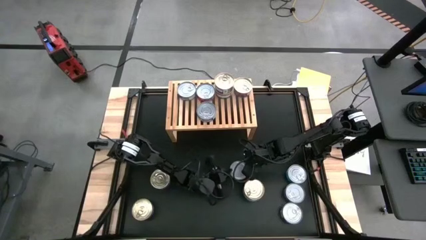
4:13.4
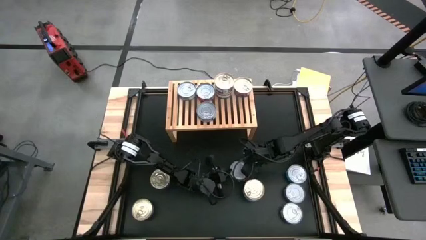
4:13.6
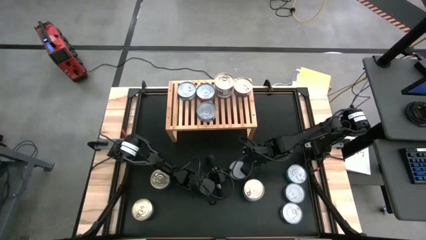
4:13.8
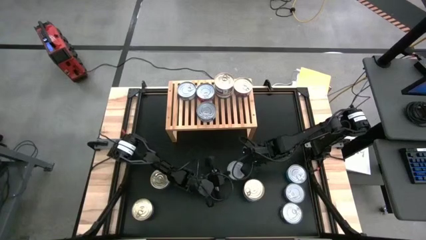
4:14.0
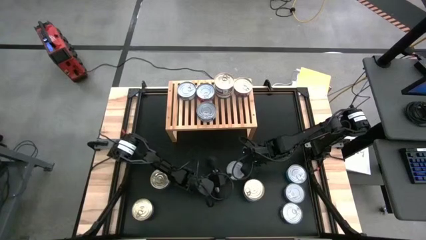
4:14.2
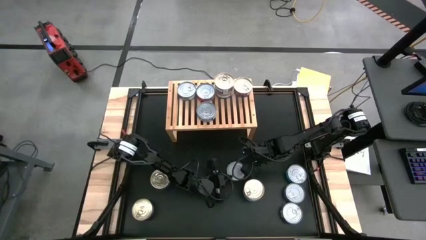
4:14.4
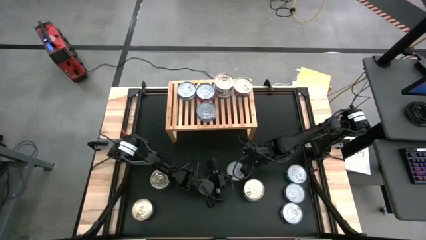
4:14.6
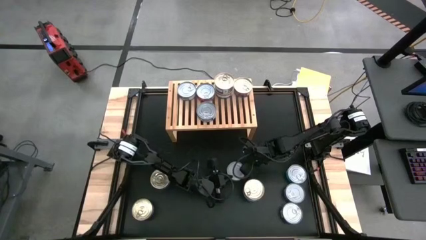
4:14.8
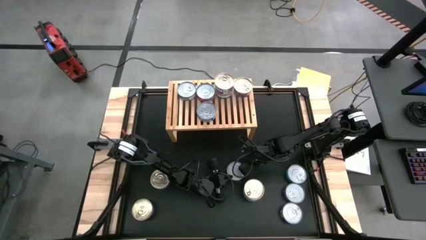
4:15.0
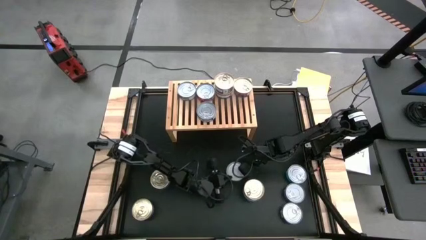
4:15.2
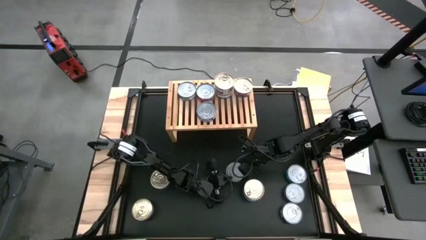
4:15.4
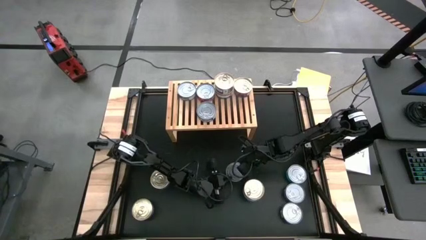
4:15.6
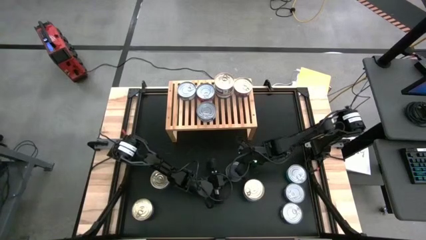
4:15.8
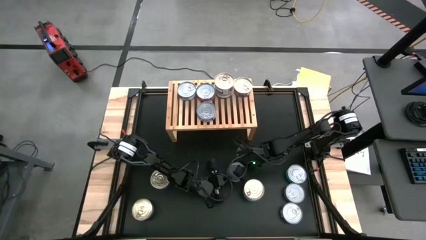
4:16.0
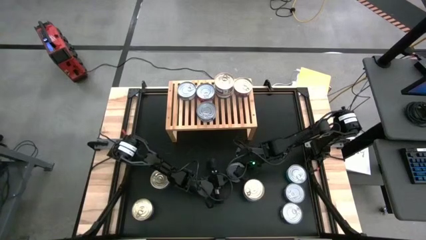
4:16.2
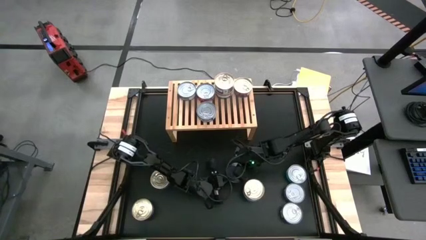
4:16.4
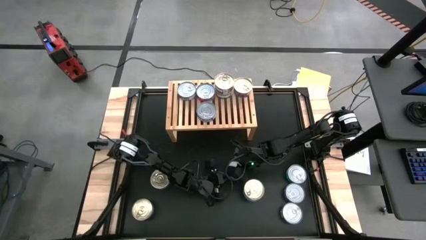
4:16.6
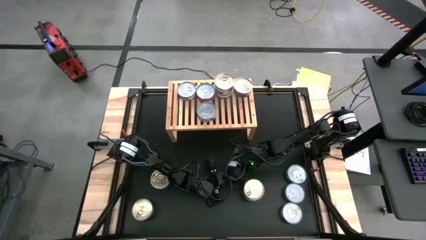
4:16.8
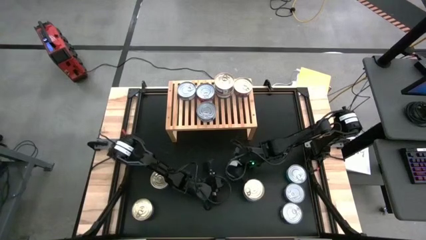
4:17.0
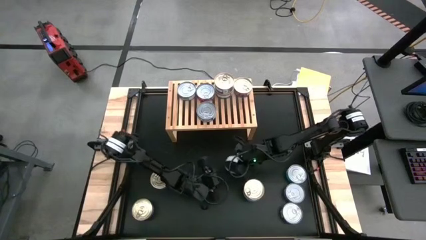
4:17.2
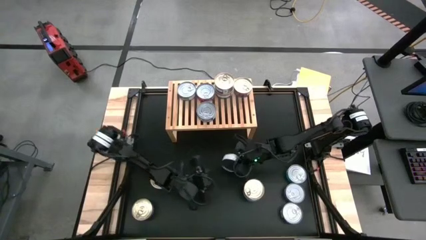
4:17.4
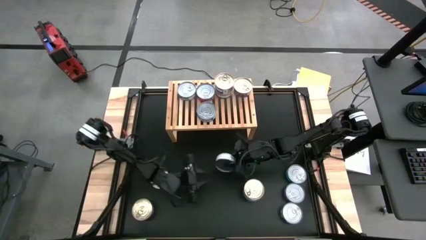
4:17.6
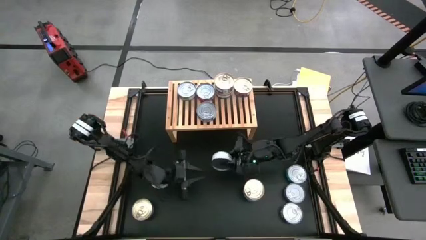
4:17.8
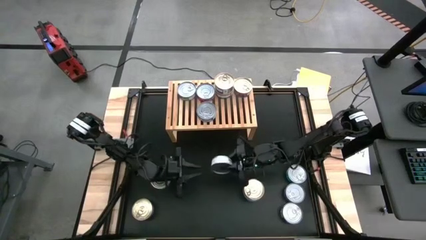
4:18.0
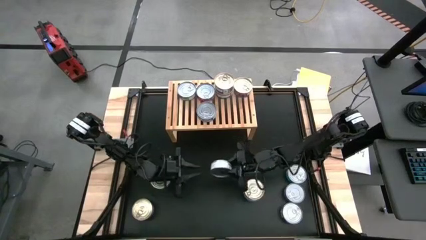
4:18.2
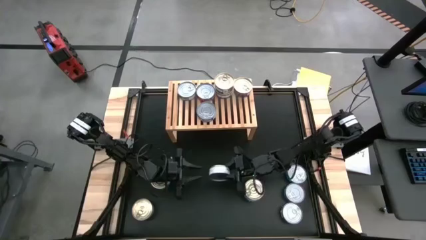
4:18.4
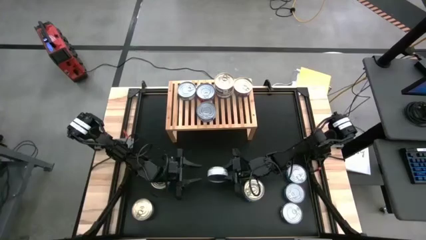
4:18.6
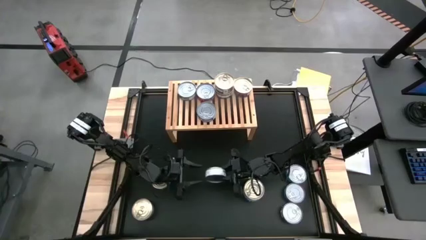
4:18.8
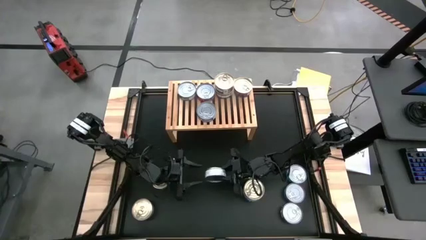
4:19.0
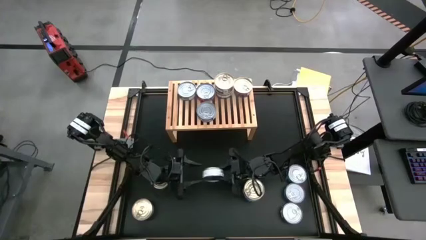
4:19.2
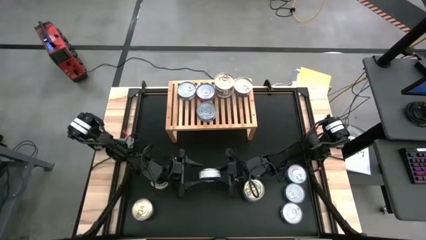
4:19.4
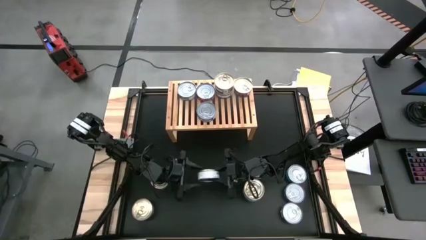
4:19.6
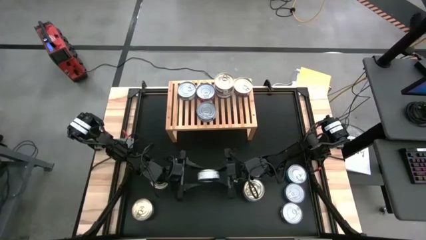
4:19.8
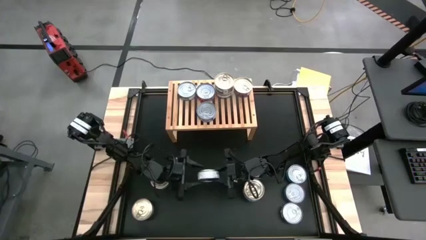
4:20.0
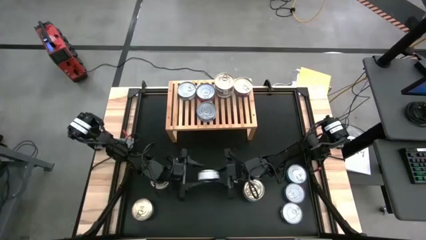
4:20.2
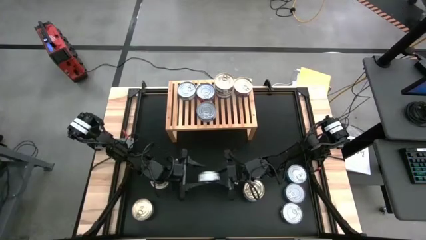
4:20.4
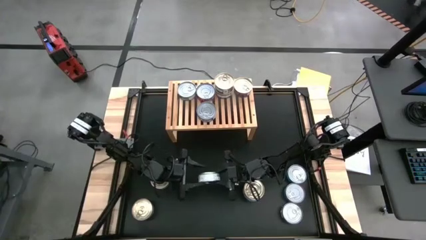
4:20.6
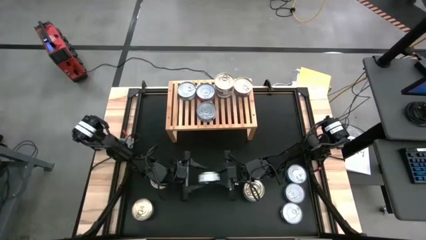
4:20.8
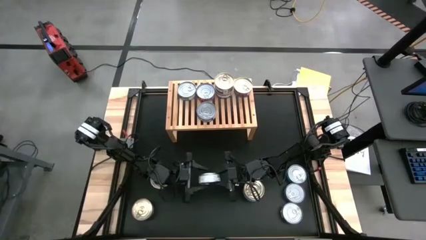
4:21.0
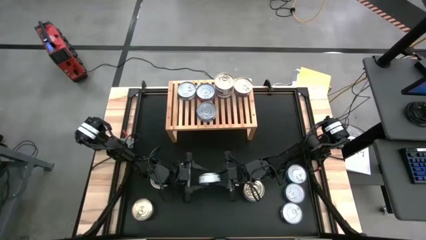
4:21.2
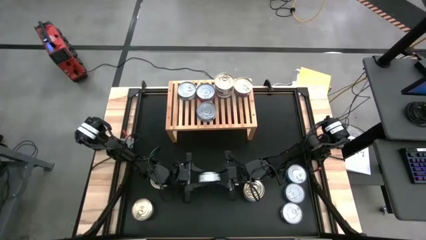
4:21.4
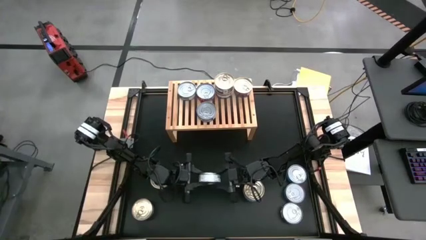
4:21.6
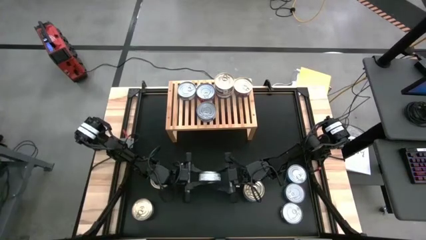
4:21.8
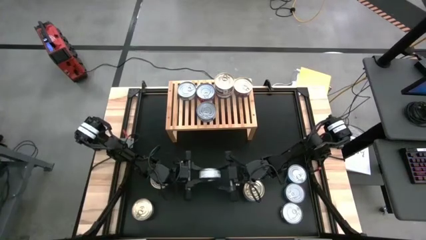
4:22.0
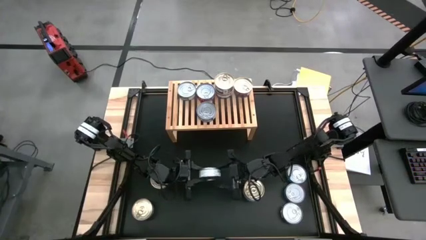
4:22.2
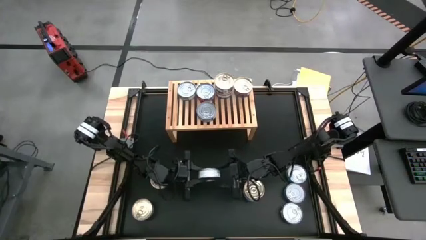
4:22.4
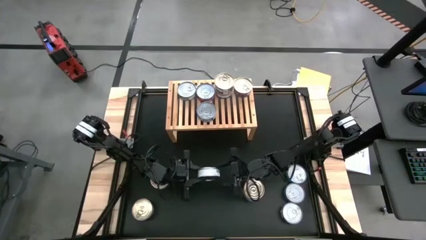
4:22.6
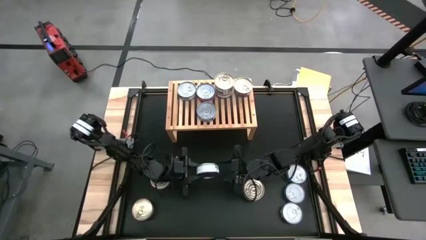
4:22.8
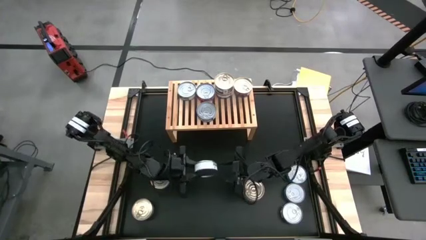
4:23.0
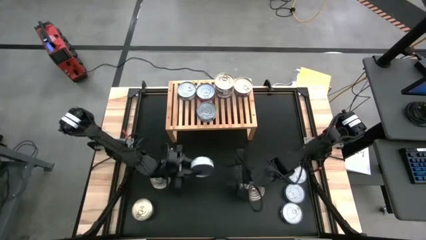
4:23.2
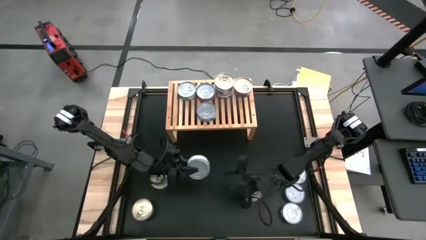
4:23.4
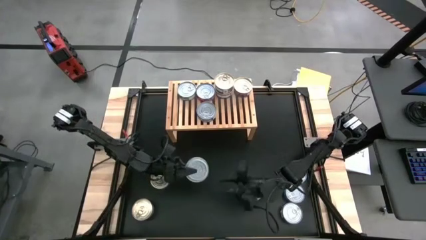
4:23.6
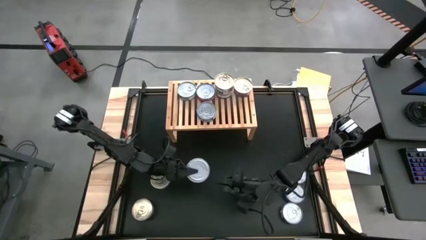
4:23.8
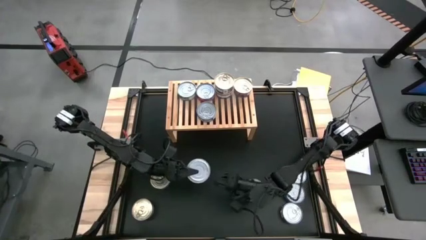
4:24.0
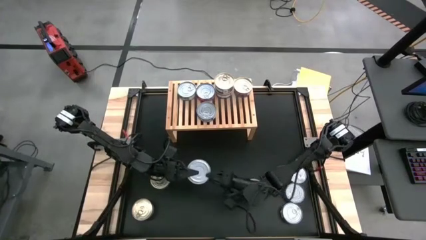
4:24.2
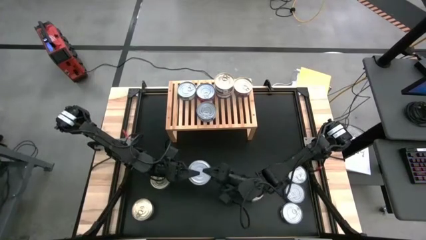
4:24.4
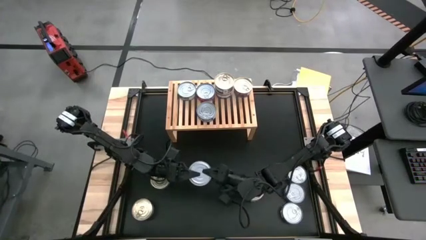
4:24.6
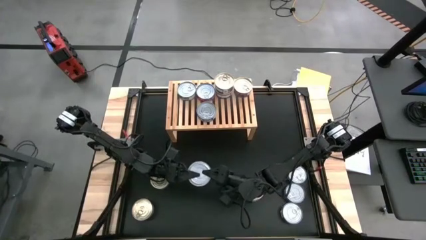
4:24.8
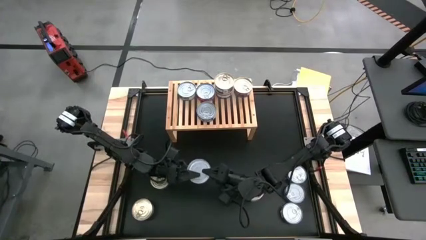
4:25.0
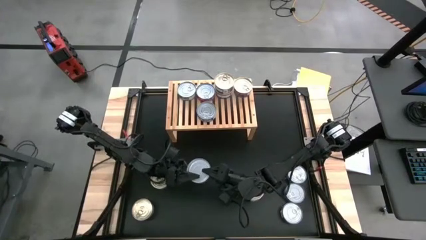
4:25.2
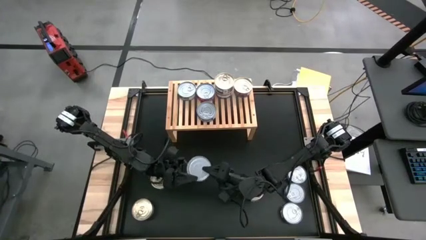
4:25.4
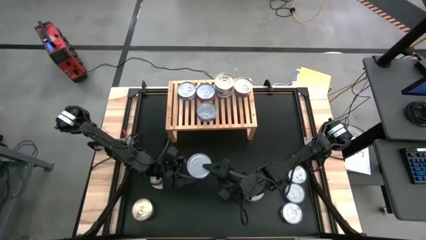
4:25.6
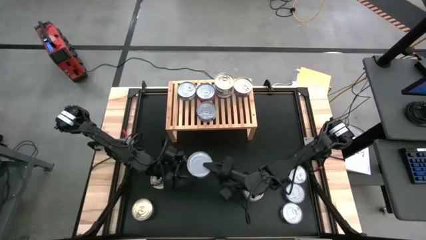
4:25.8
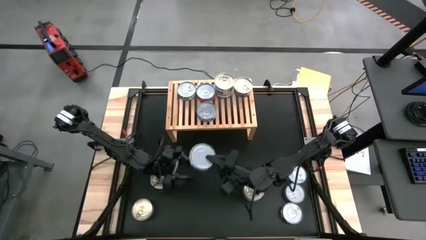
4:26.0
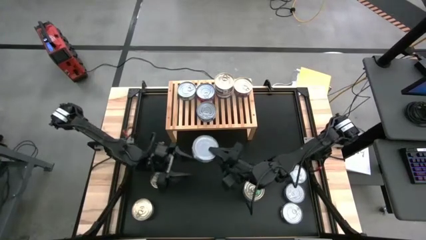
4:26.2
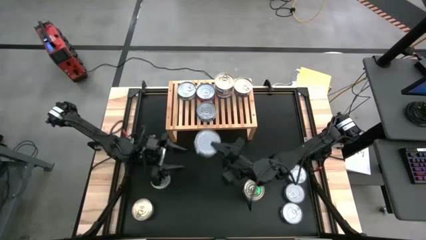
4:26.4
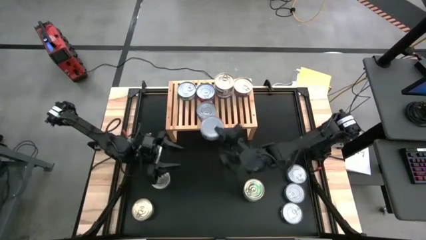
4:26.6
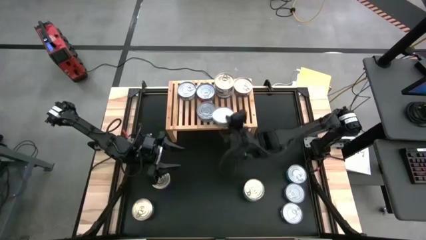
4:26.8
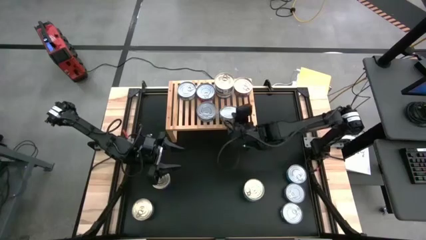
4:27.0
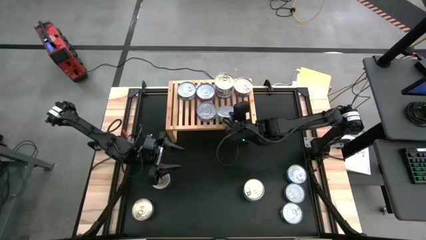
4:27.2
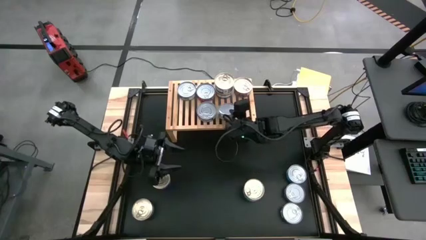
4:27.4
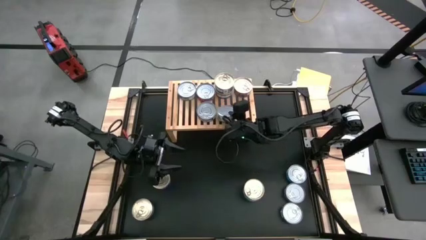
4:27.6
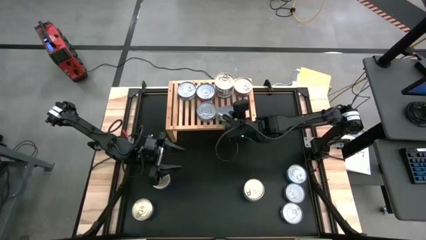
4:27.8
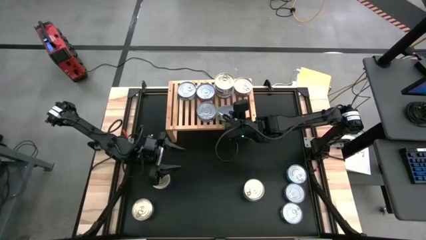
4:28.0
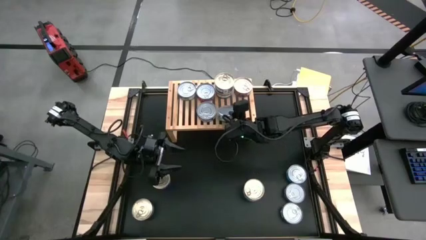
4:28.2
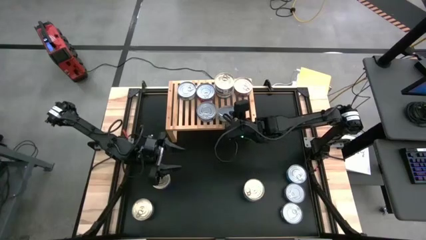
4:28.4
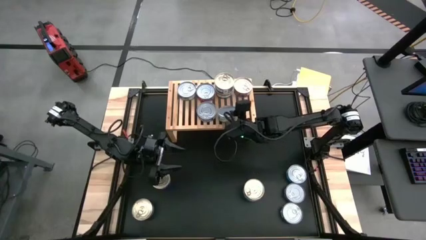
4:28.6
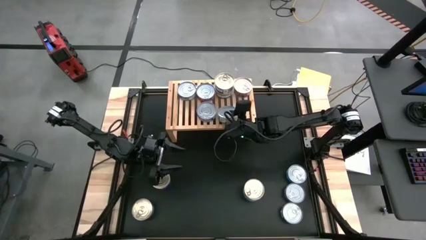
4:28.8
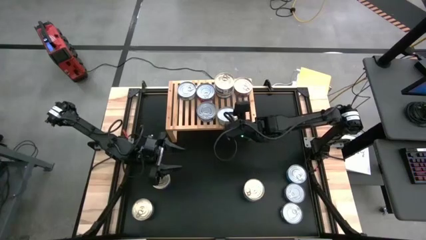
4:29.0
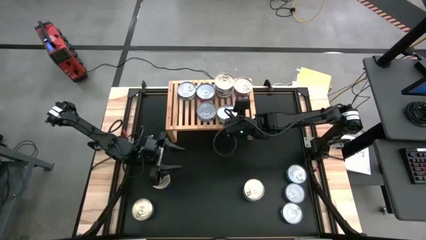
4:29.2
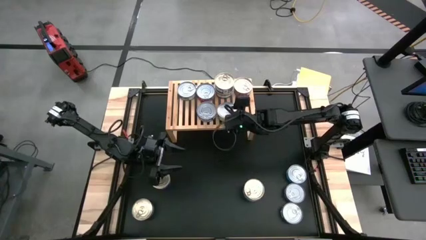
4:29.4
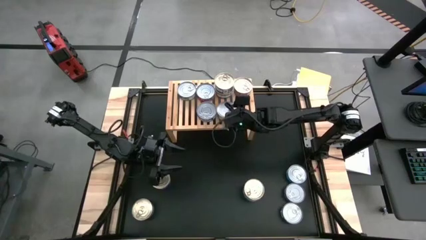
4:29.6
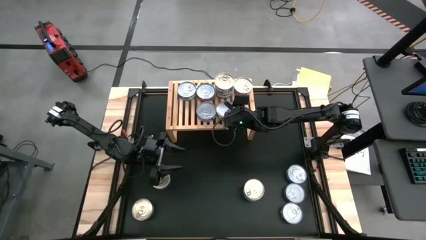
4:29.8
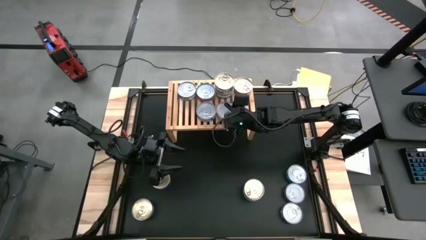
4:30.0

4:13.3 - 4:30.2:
Task: Stack canned seafood by type on shelf
Put the white and green tuna can on the shelf aligned with the other blue and pink tuna cans
